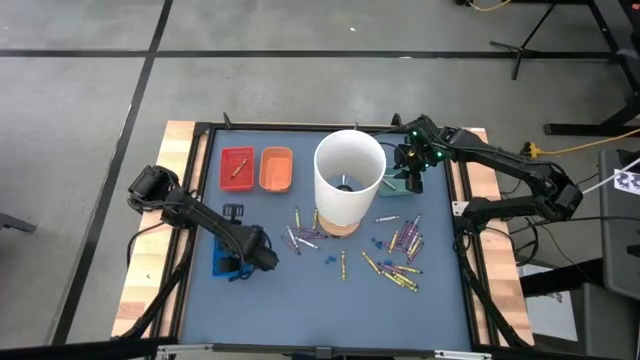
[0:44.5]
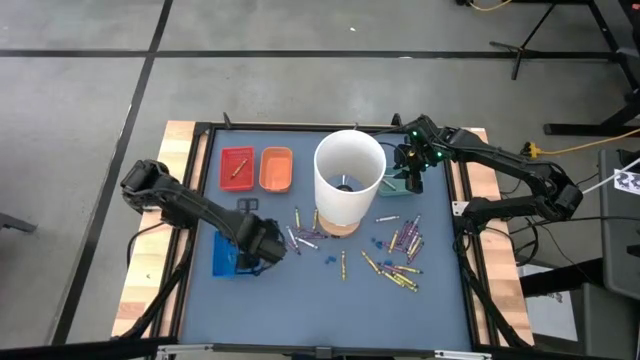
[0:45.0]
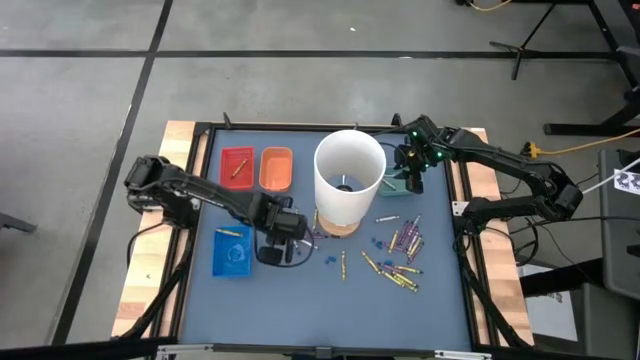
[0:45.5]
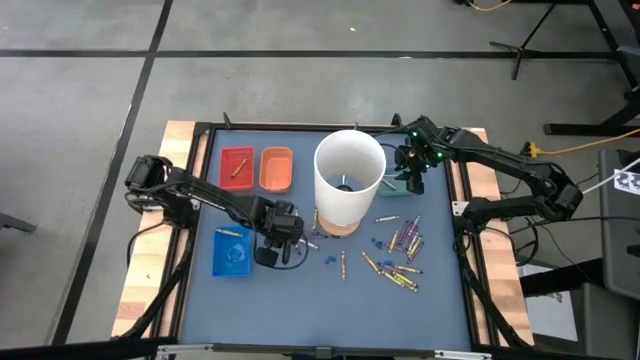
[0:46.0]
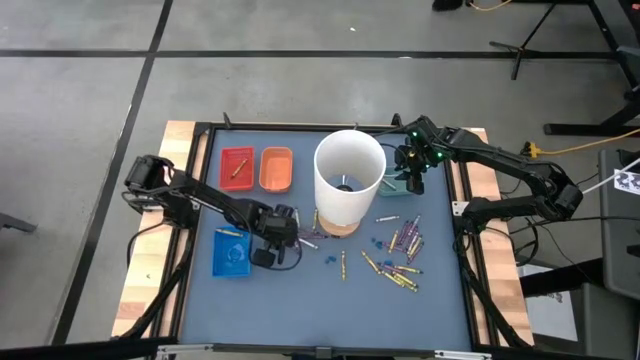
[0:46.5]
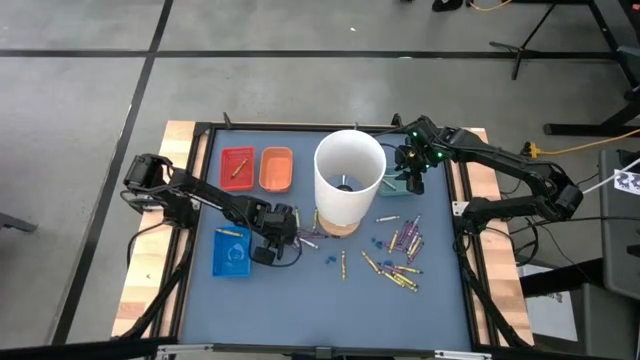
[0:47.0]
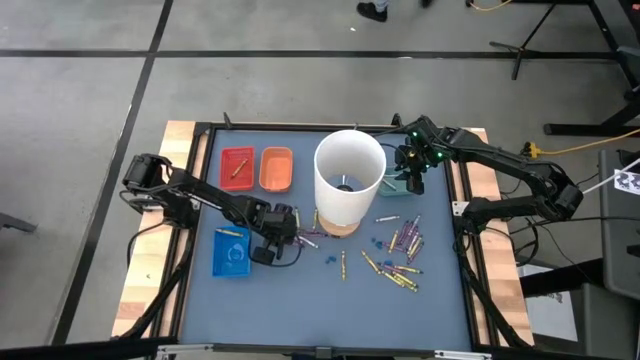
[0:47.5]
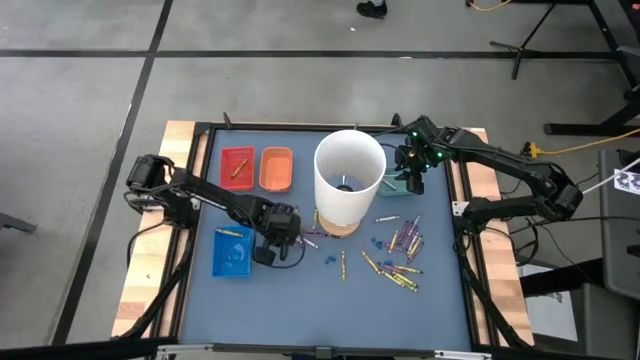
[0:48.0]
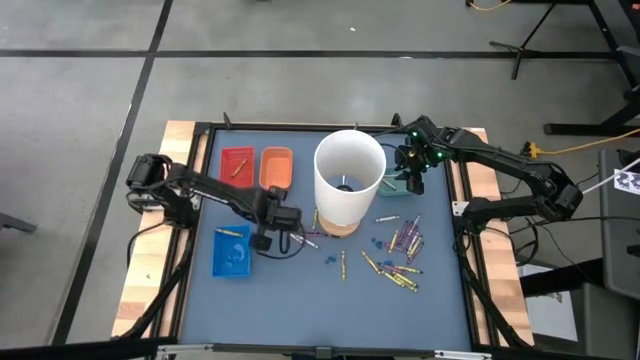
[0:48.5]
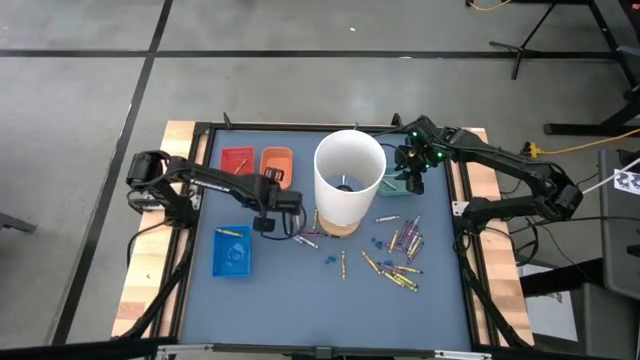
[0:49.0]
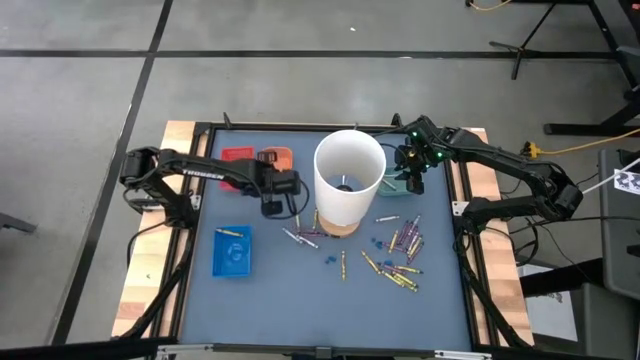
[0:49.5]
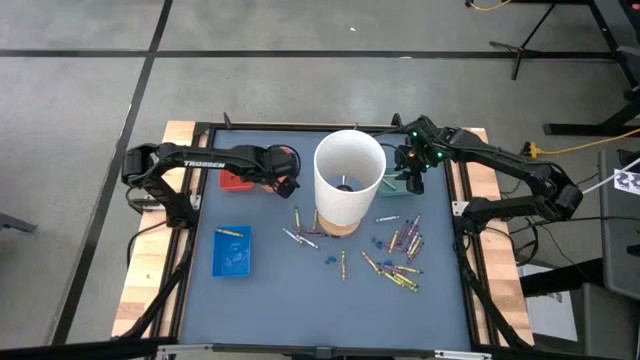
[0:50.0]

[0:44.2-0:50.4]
Task: Sort crayons
Put the violet crayon into the orange bin

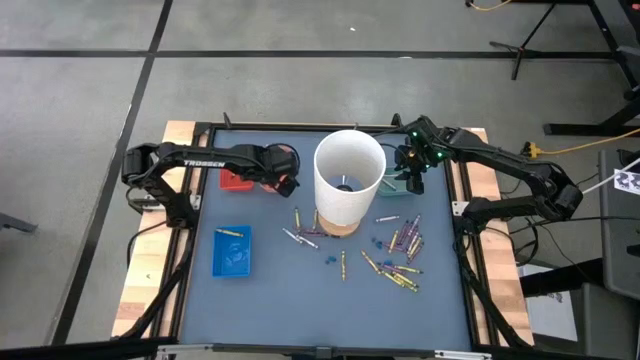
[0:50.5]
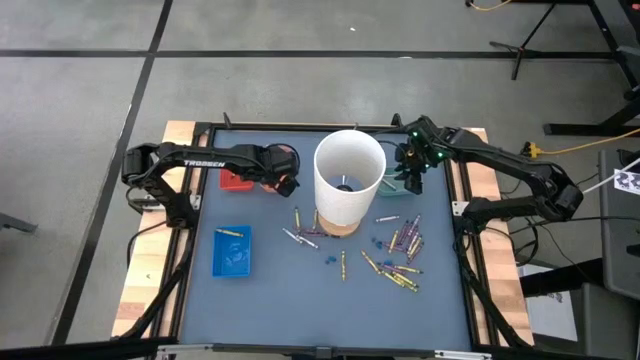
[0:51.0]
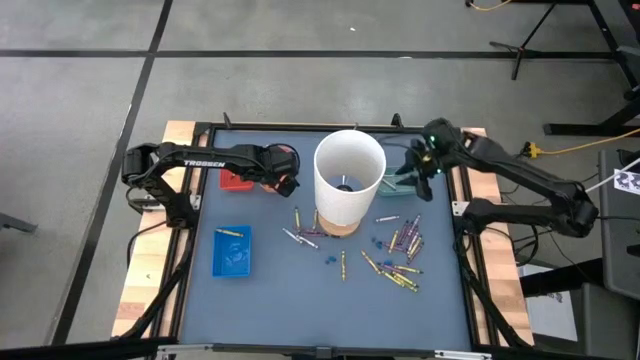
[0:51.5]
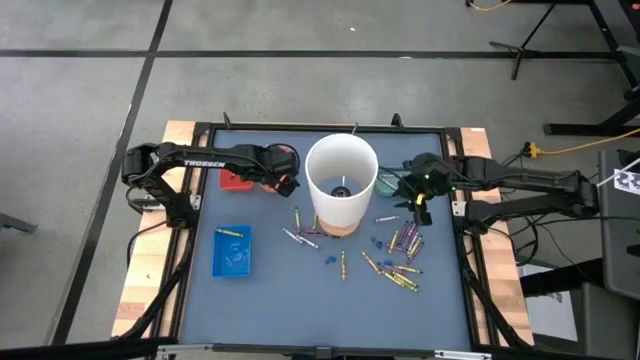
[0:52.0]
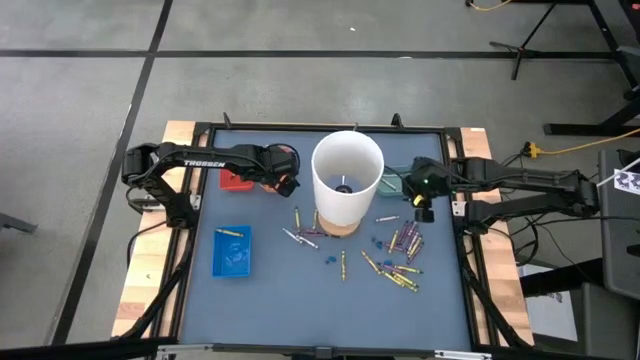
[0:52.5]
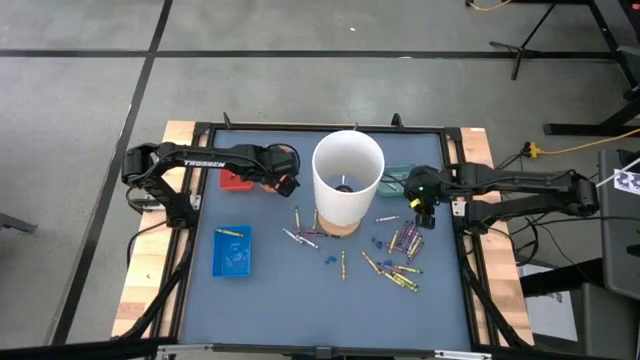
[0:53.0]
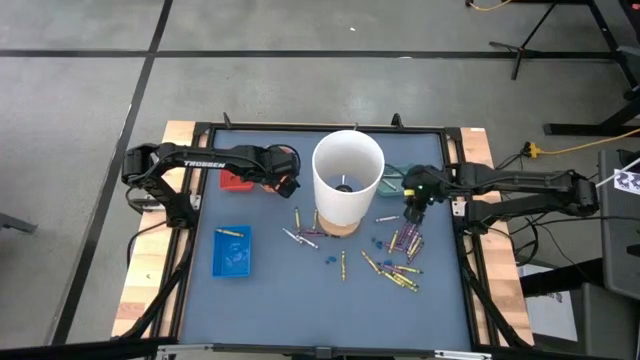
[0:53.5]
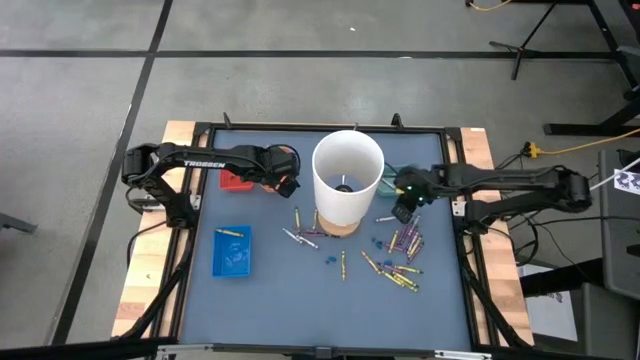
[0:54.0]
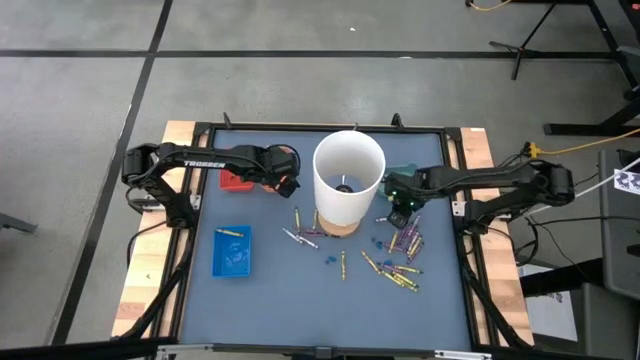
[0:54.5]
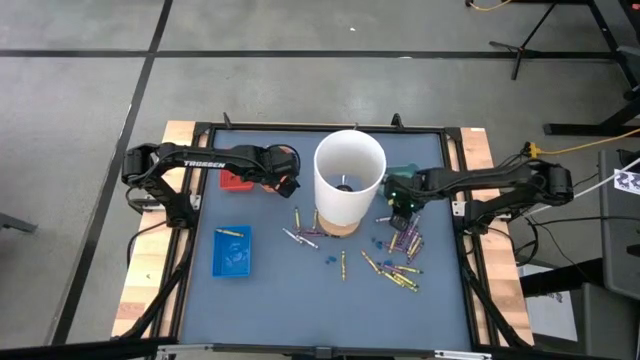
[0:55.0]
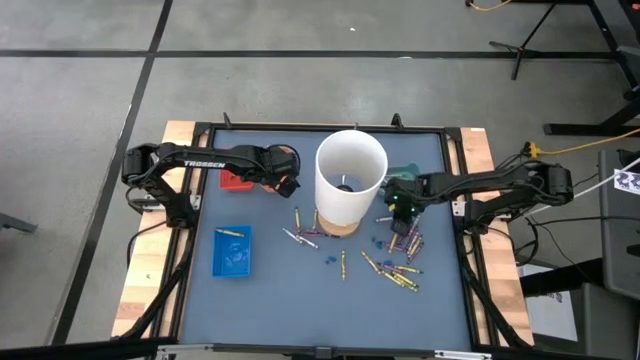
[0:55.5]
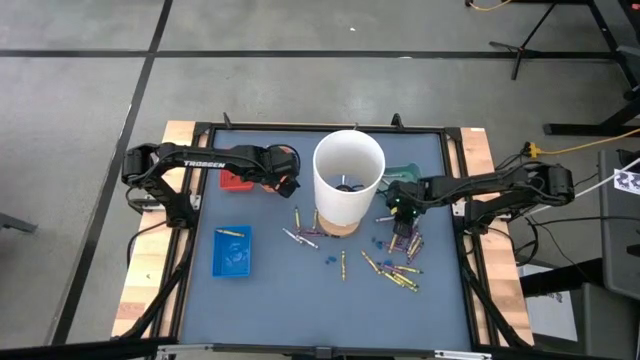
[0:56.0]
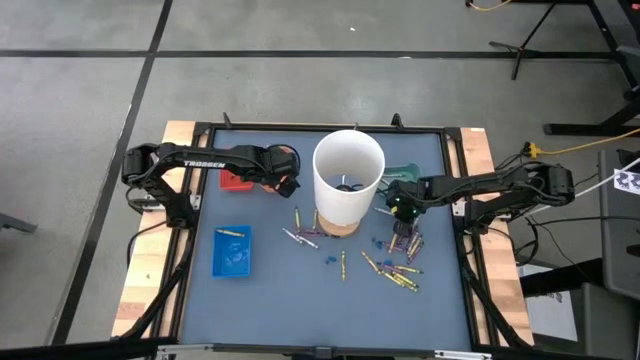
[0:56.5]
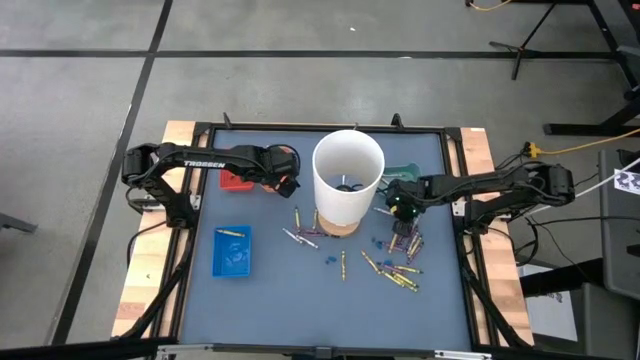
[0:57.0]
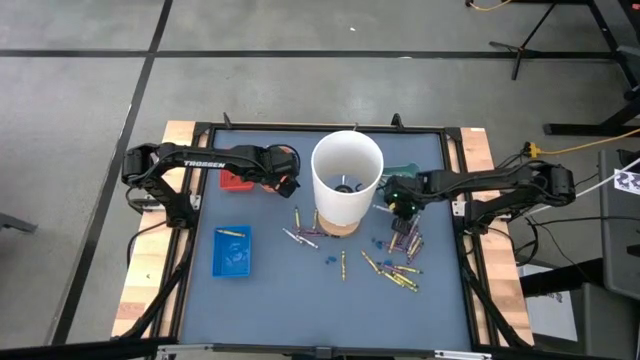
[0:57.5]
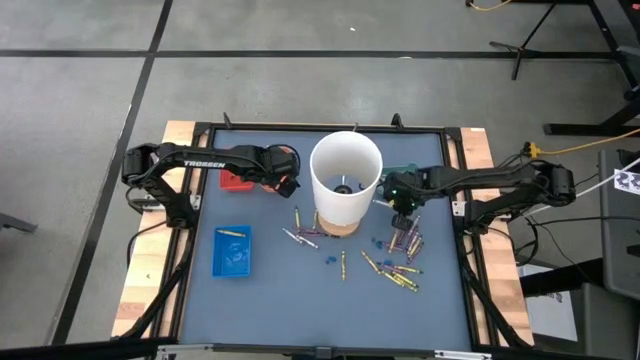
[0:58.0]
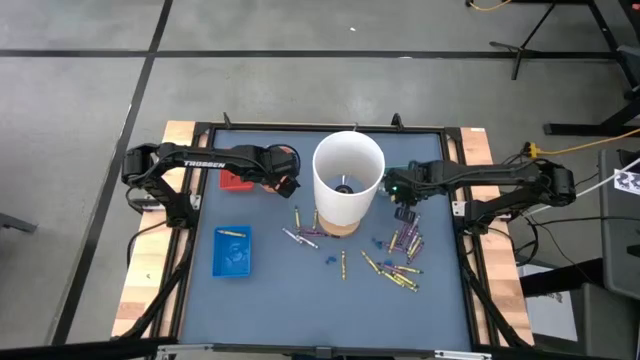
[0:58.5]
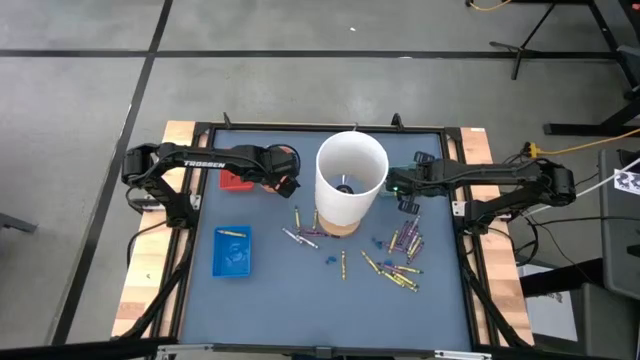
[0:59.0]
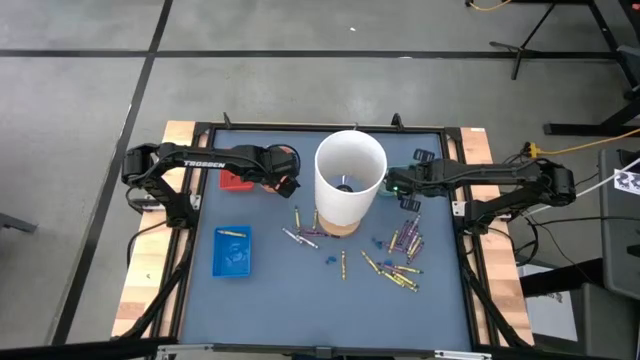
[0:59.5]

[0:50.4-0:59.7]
Put the gray crayon into the green bin

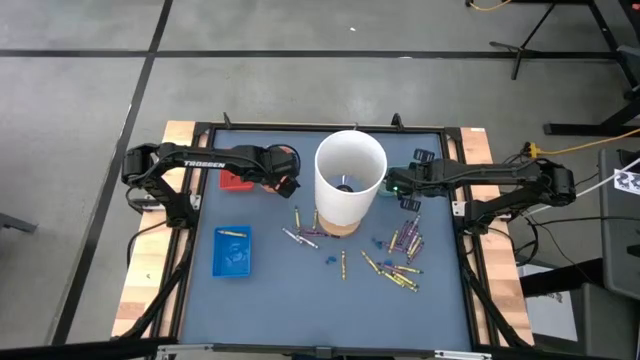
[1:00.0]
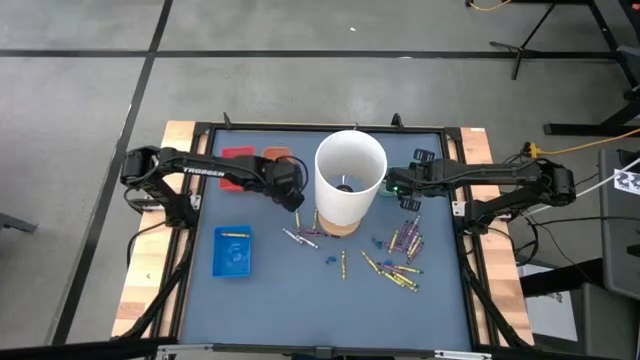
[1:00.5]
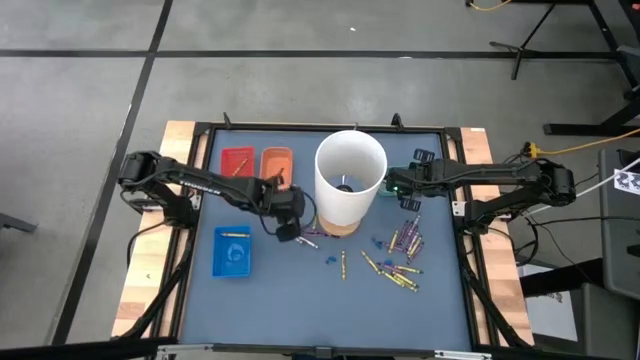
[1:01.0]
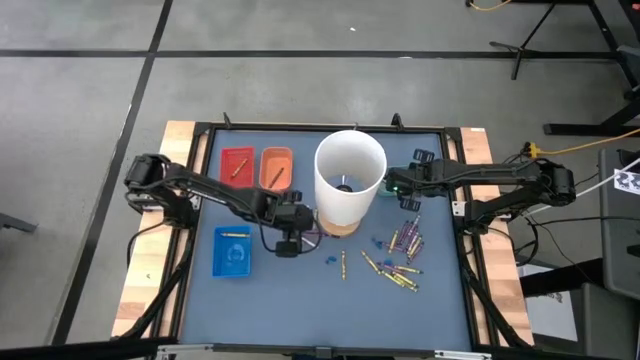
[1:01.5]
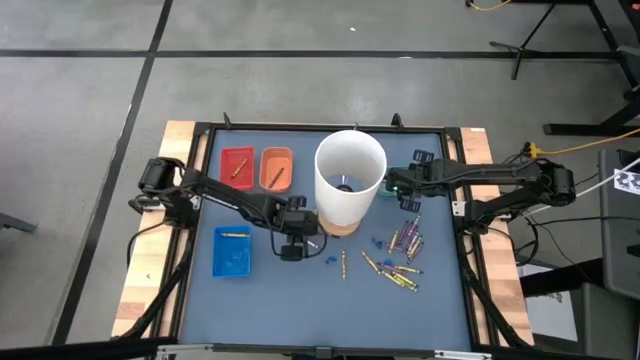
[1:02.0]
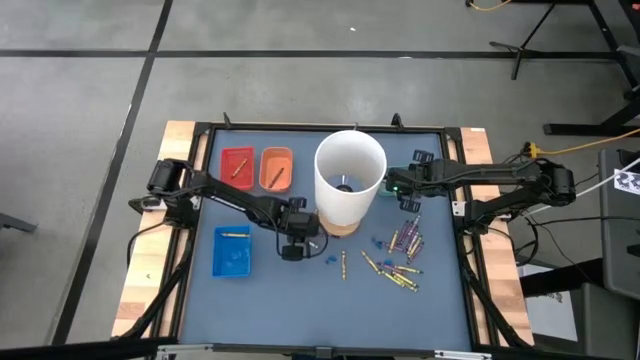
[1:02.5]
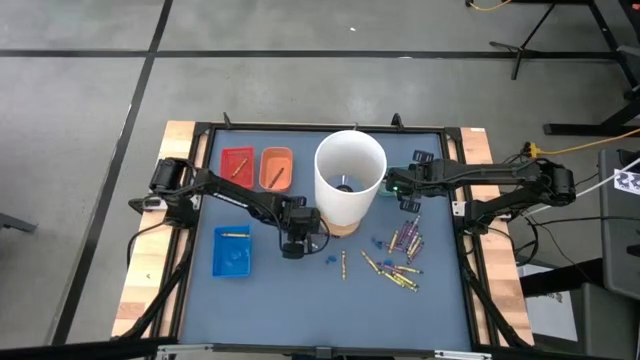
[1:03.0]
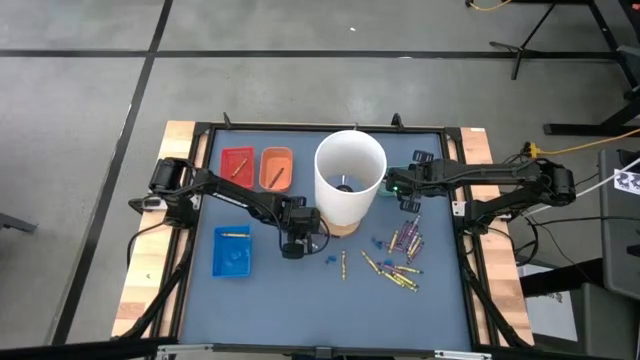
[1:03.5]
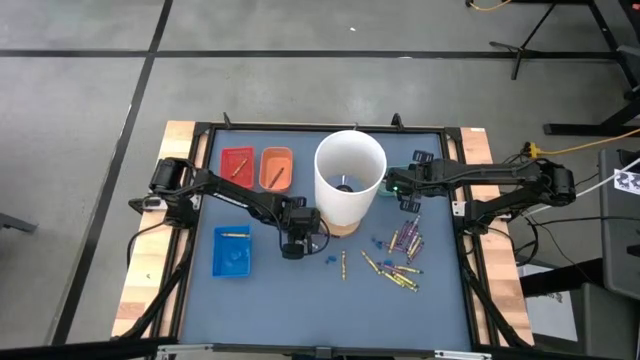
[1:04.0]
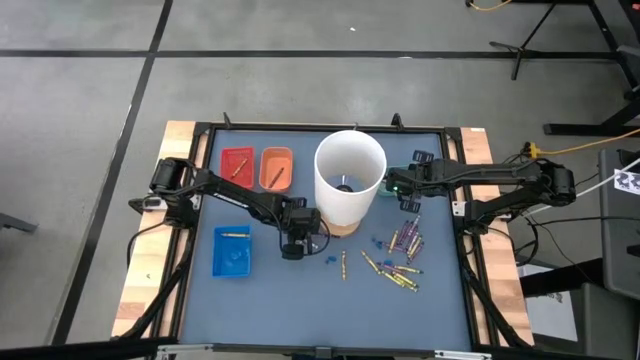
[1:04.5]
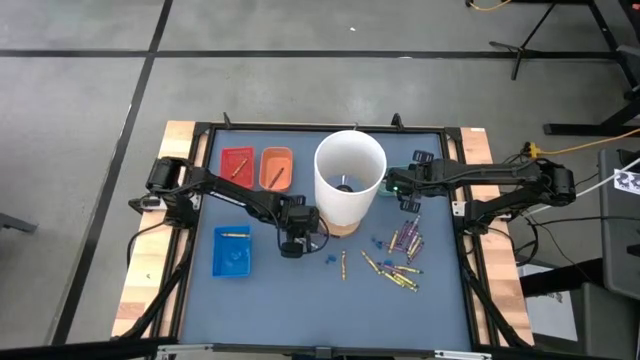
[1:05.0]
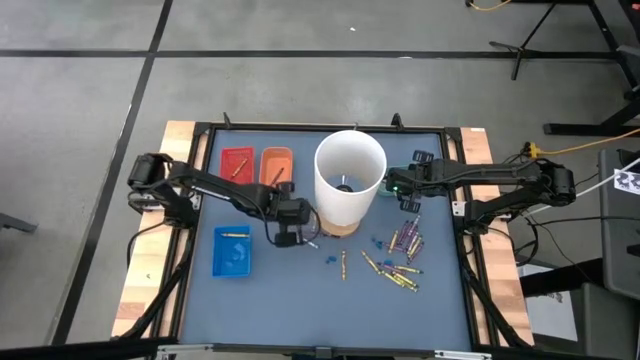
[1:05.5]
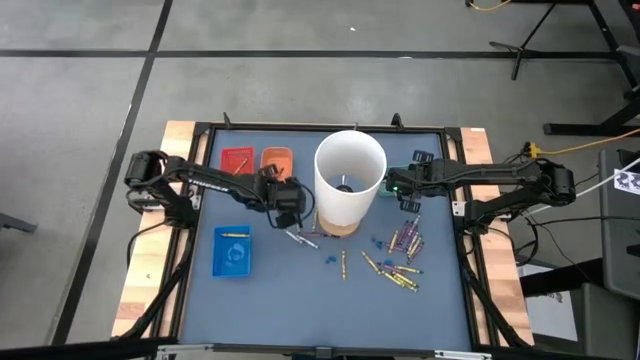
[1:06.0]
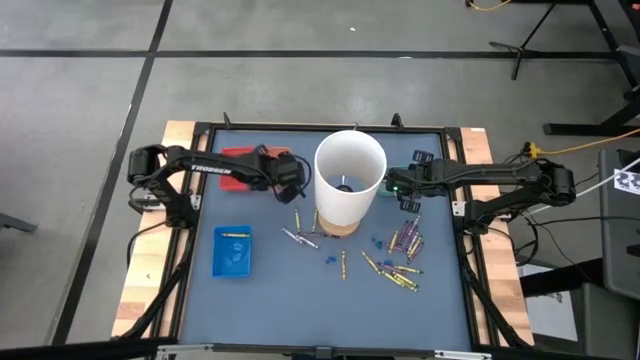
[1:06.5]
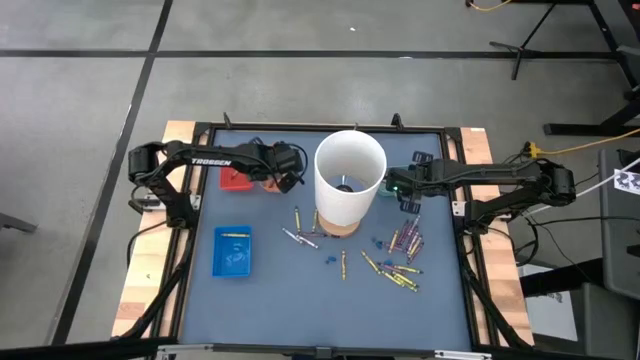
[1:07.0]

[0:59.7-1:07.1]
Put the violet crayon into the orange bin
